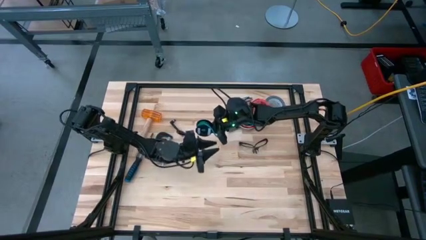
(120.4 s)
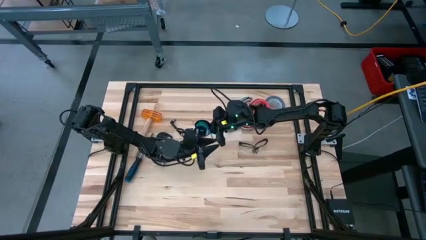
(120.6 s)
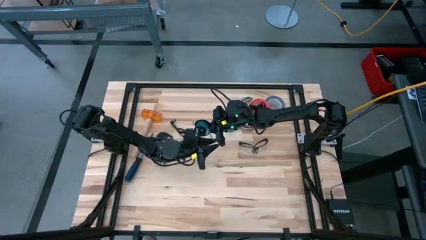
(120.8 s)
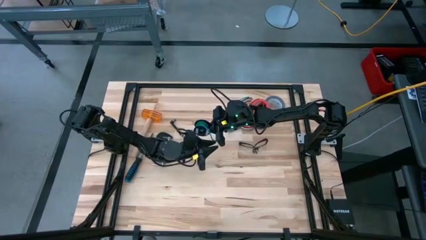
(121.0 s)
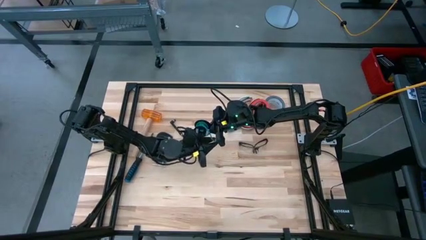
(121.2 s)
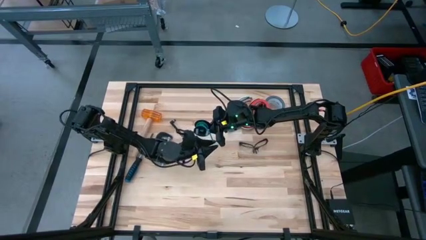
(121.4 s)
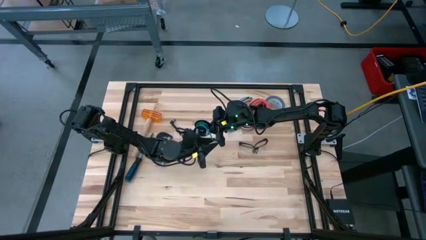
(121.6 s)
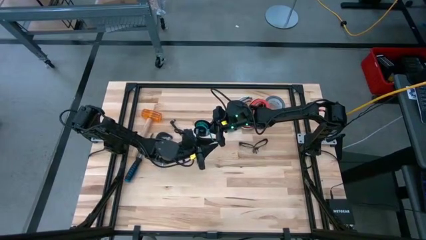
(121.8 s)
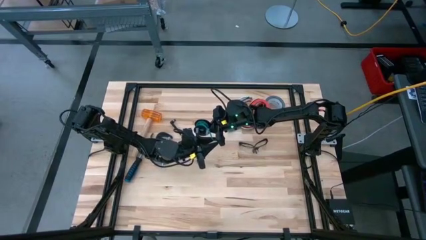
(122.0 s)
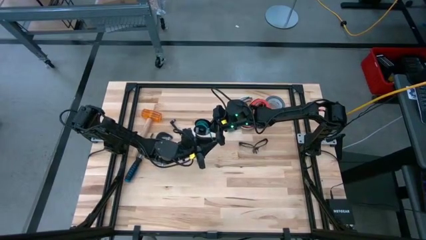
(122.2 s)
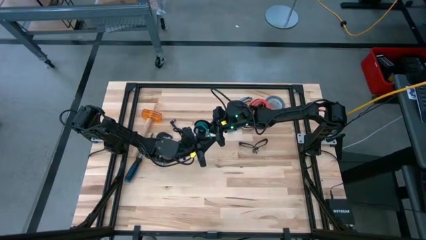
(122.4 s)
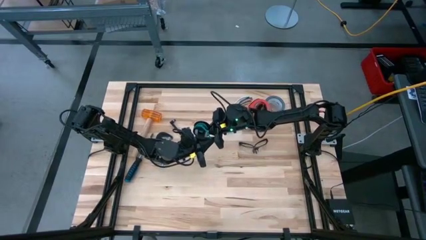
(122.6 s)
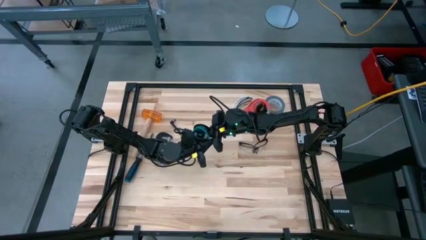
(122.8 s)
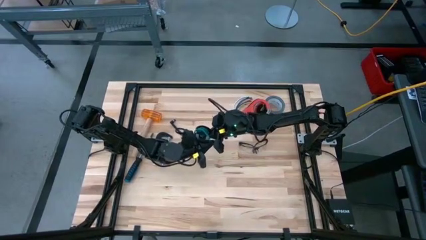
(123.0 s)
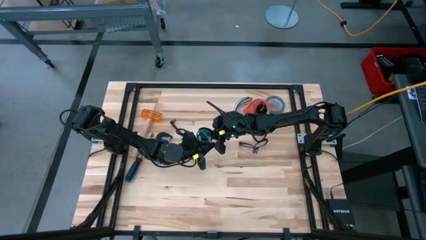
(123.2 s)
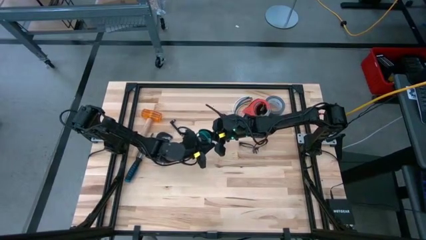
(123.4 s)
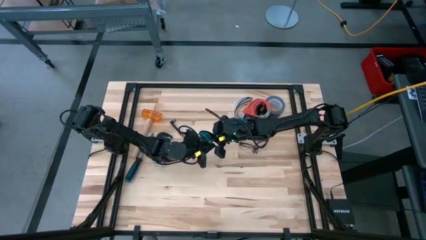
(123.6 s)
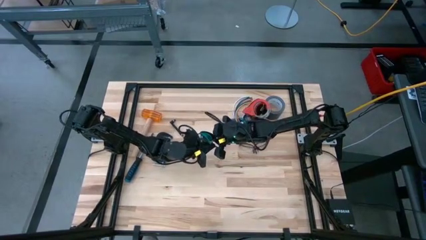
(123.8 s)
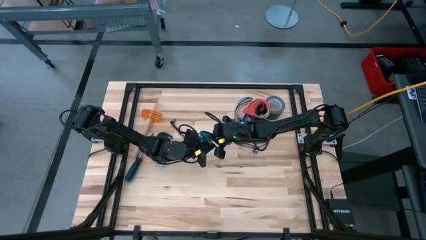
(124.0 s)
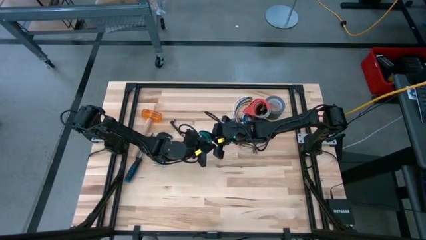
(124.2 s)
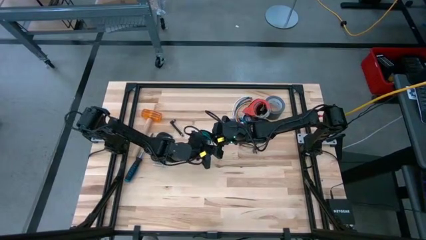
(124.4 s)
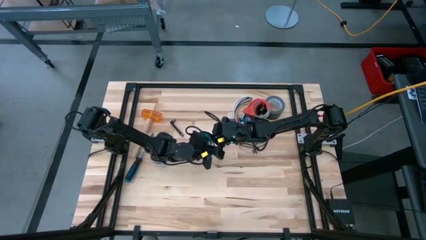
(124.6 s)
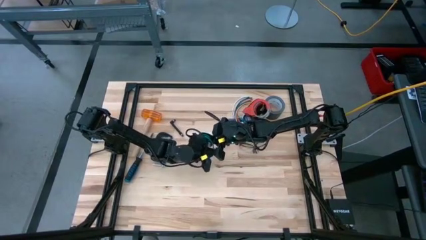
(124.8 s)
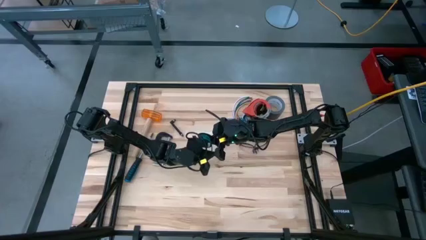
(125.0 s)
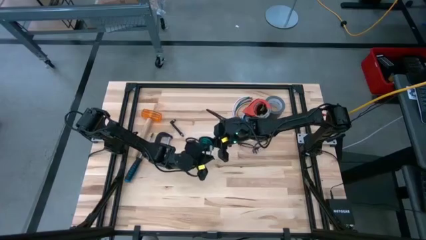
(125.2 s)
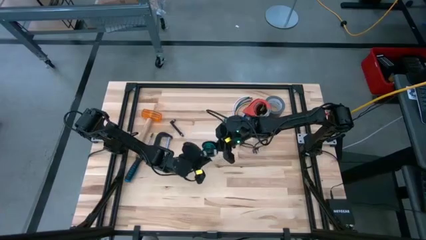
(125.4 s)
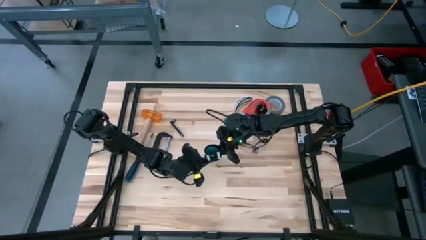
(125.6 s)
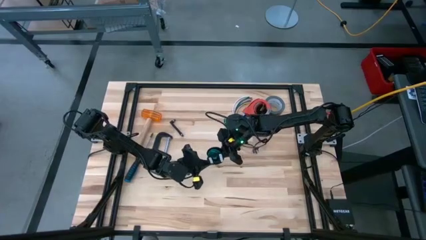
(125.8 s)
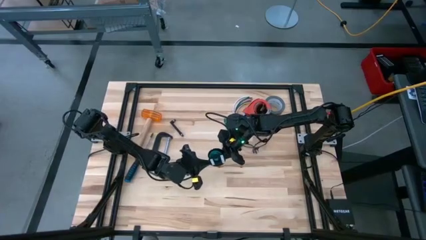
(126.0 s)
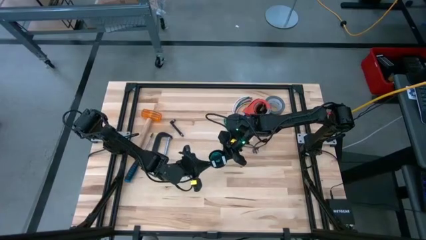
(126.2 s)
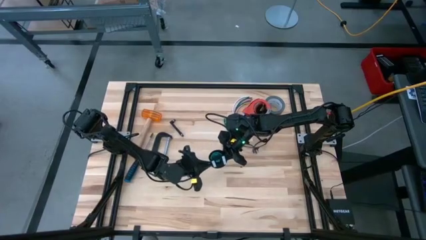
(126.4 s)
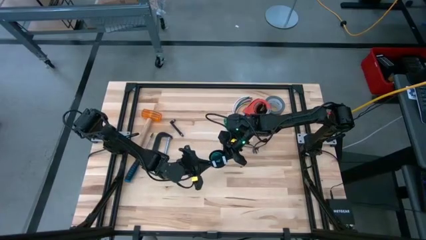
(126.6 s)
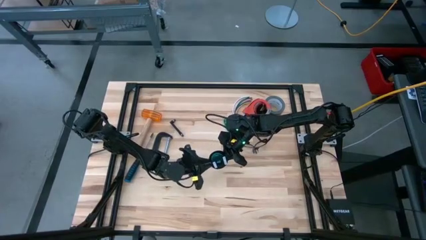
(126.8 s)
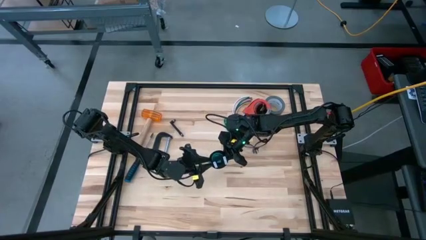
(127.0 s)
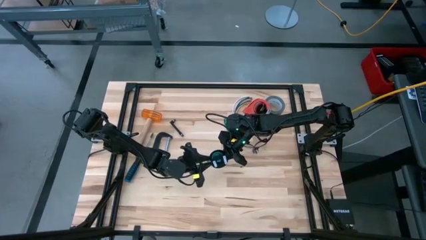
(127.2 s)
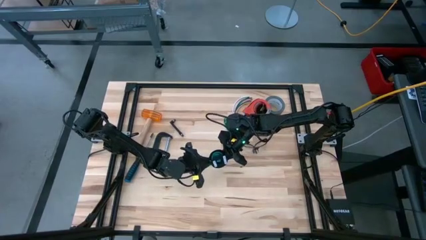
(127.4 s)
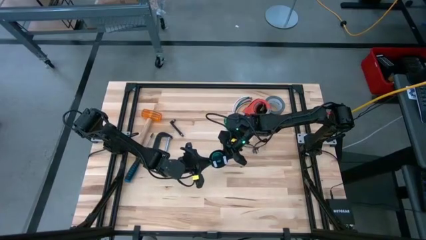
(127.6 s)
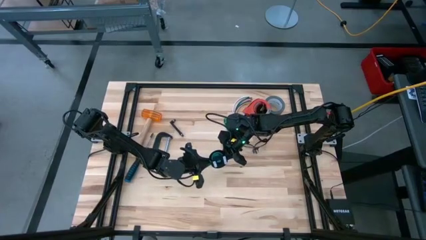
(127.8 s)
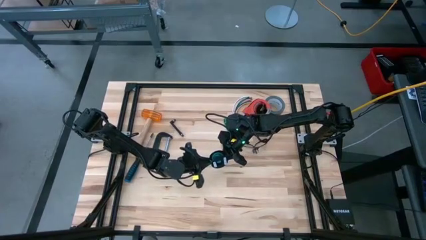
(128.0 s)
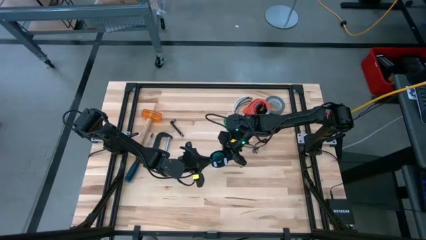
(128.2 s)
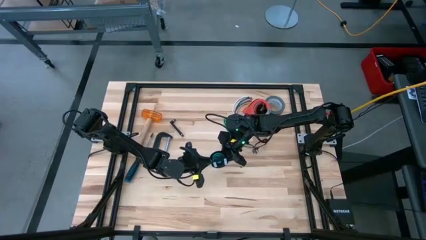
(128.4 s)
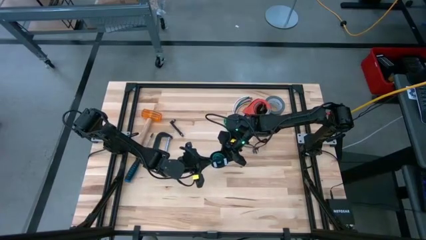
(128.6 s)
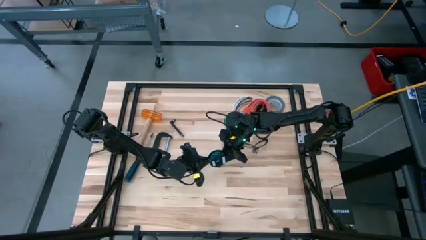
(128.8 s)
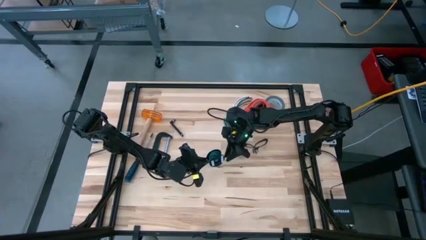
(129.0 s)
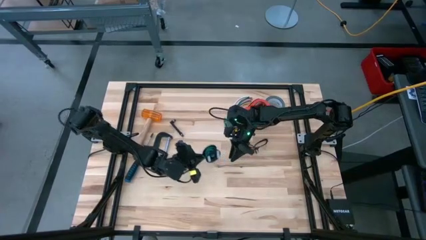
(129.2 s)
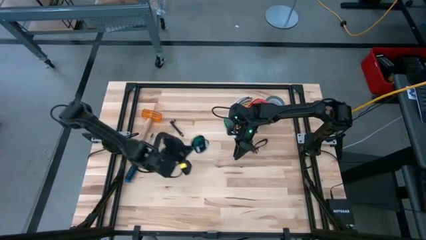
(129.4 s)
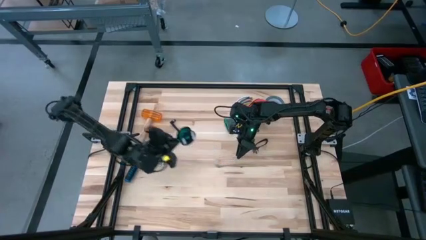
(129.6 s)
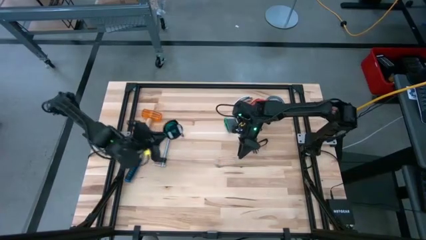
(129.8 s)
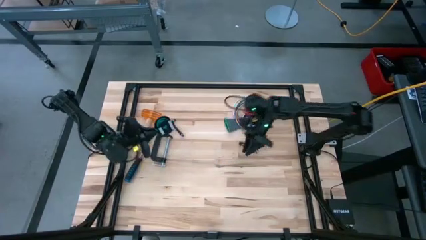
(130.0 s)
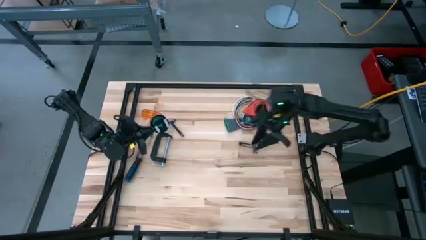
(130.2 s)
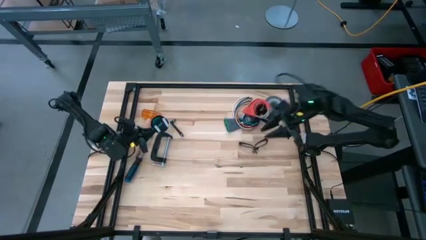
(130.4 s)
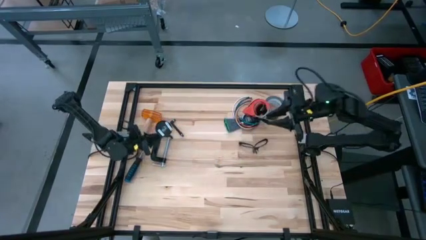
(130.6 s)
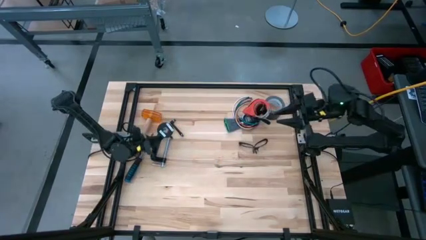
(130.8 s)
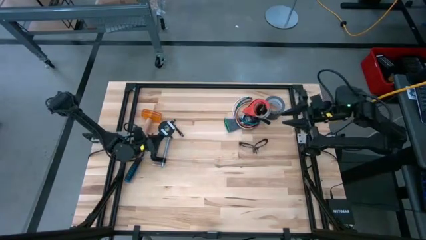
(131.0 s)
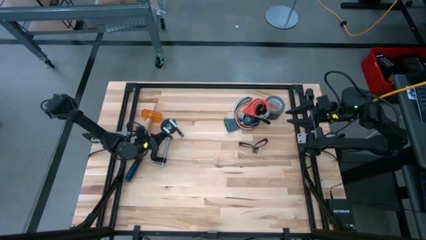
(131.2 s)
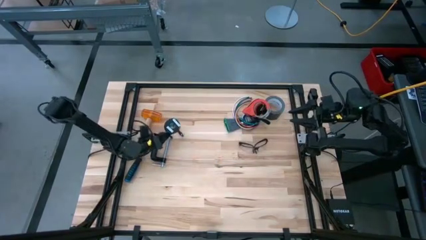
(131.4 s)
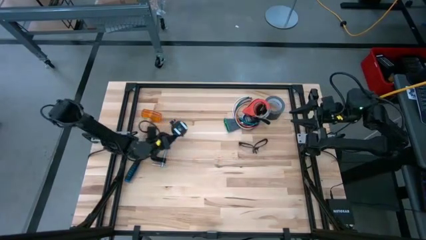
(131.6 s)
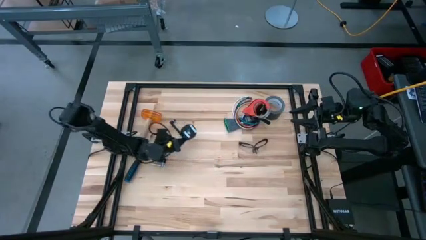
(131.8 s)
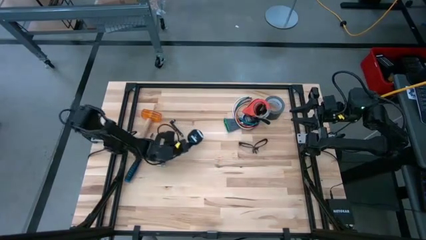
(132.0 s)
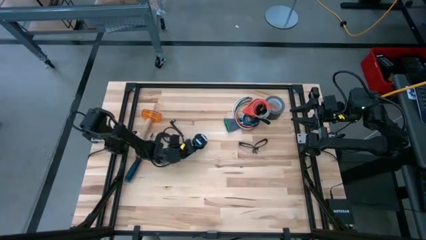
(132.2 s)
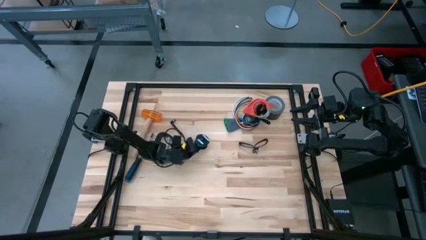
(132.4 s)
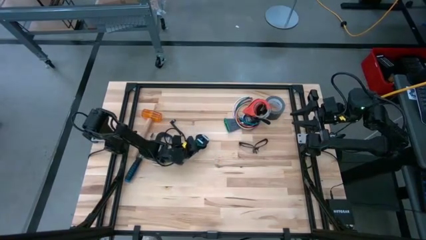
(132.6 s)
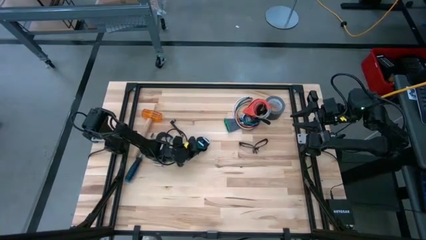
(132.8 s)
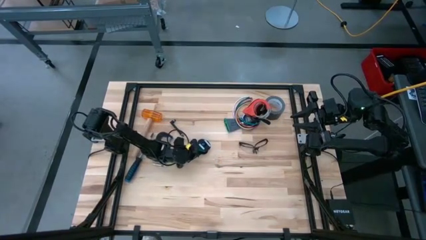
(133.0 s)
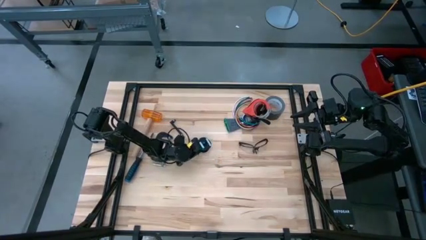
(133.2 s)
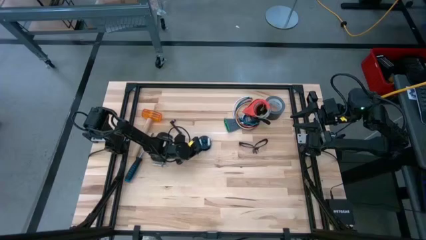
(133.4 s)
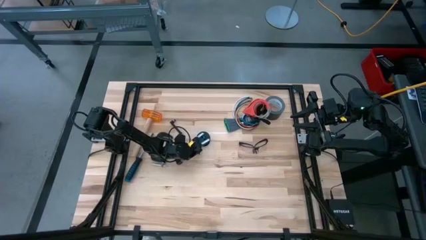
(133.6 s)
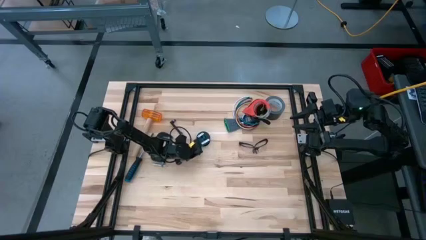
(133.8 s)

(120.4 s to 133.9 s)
Task: Coil cords
Coil the green wire to the spool

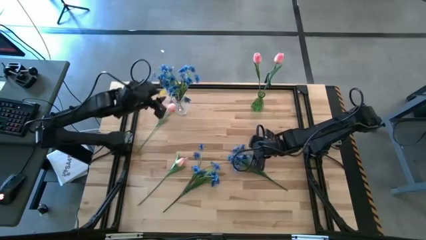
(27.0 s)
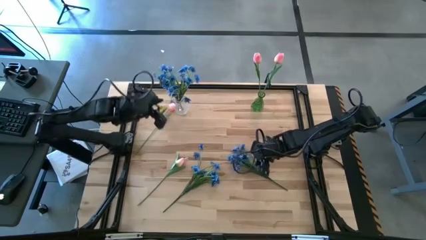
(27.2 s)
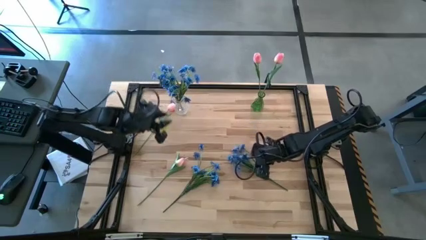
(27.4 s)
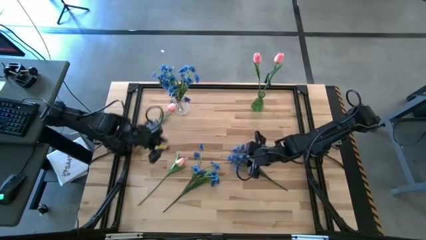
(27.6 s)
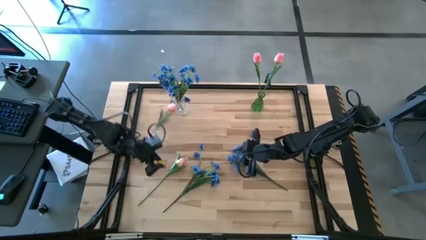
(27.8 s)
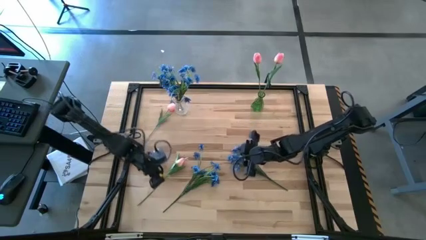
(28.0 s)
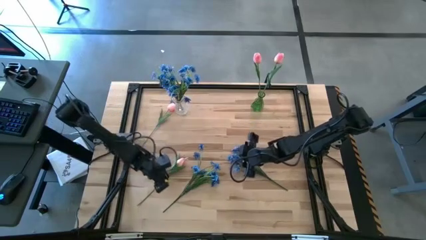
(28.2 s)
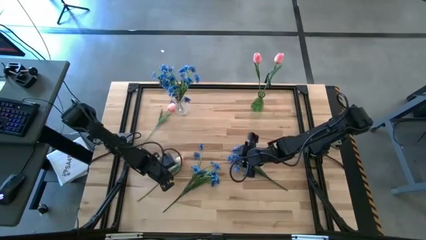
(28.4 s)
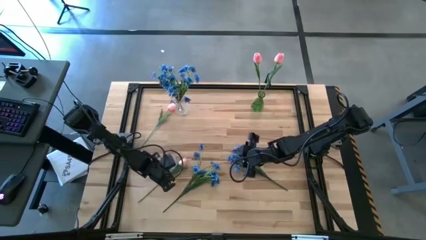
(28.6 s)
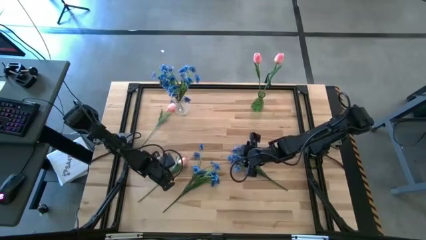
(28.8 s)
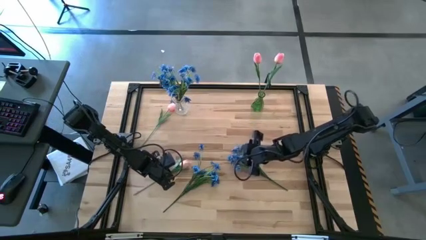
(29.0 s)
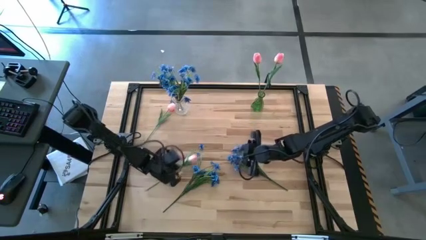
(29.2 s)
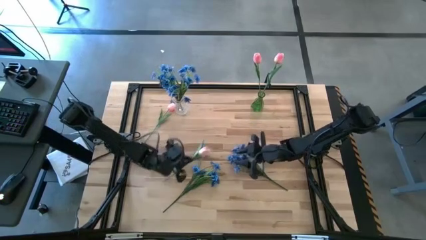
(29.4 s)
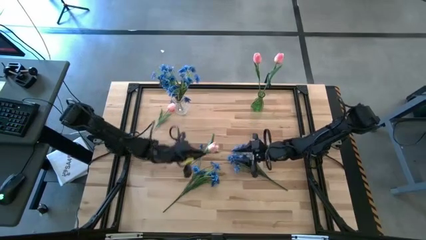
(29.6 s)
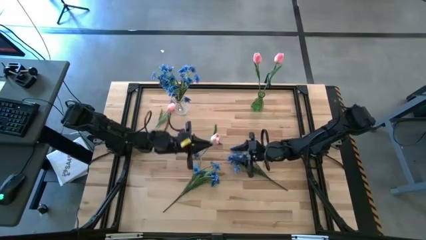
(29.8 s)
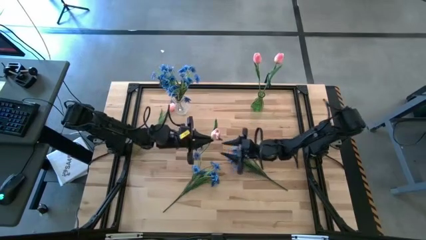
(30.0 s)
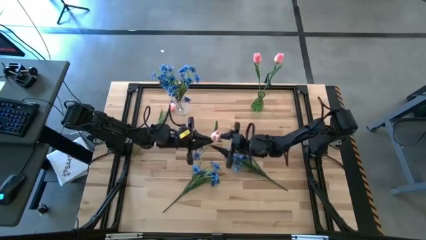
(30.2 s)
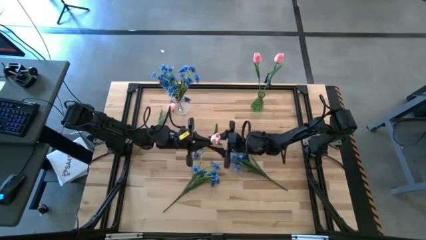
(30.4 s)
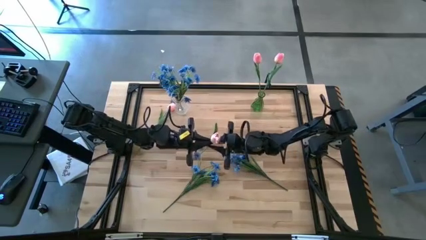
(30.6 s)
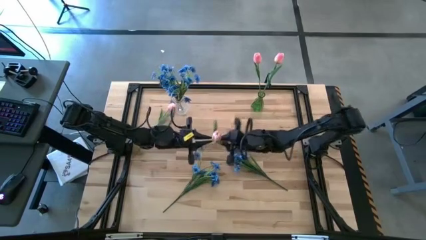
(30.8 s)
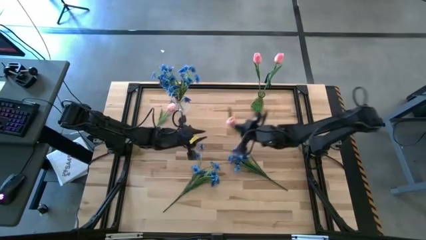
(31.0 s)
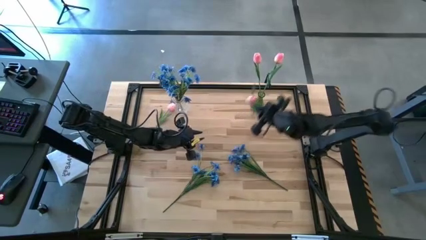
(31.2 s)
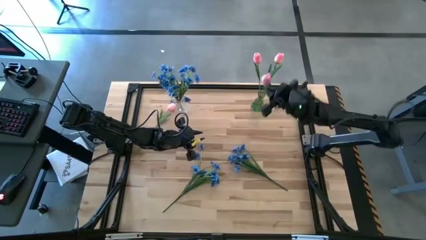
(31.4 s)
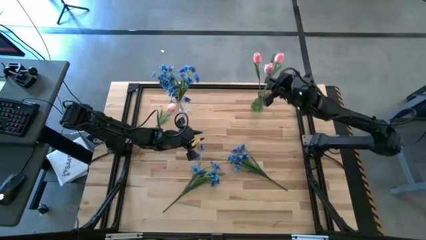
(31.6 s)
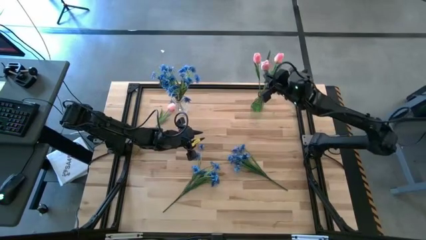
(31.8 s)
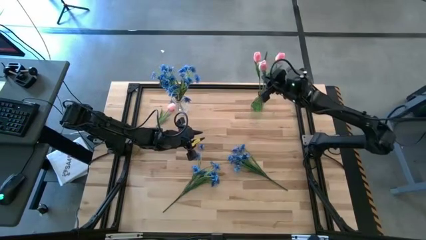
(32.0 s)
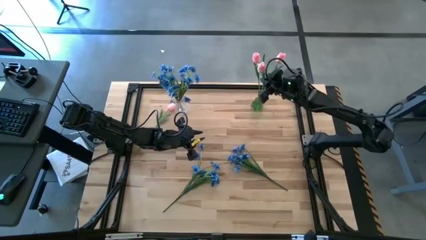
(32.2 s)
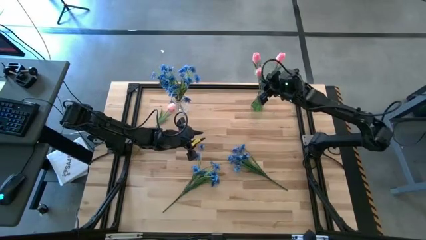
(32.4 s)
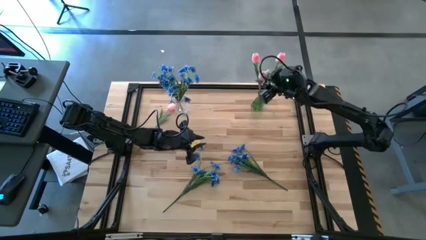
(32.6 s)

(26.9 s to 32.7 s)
Task: Sort flowers into vase by color
Put the pink flower into the green vase
